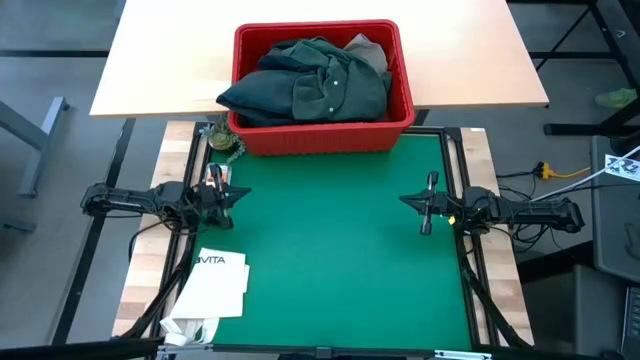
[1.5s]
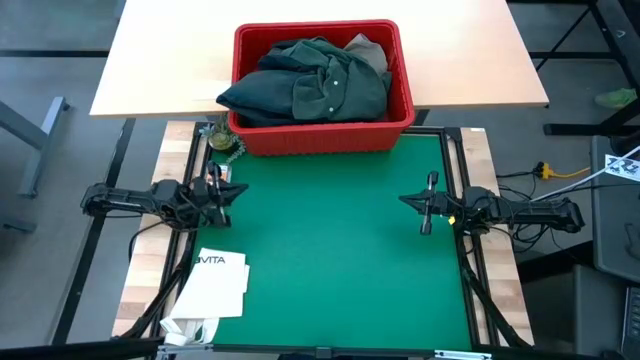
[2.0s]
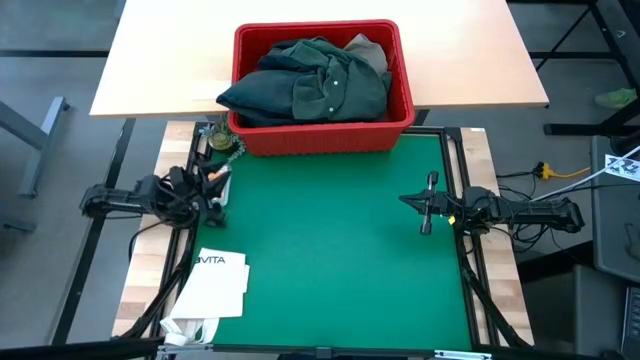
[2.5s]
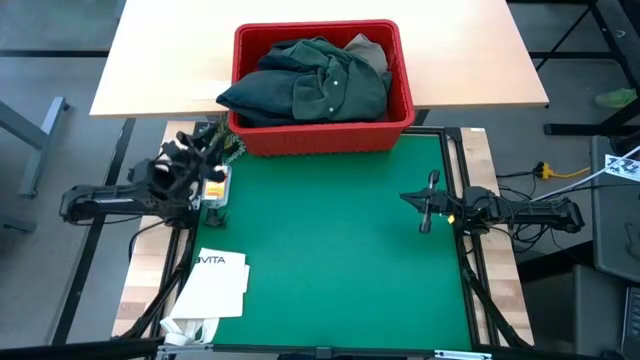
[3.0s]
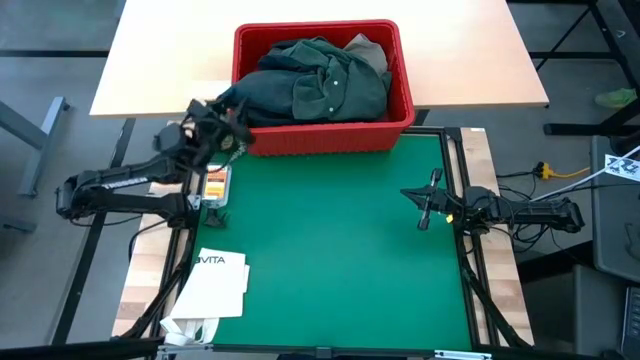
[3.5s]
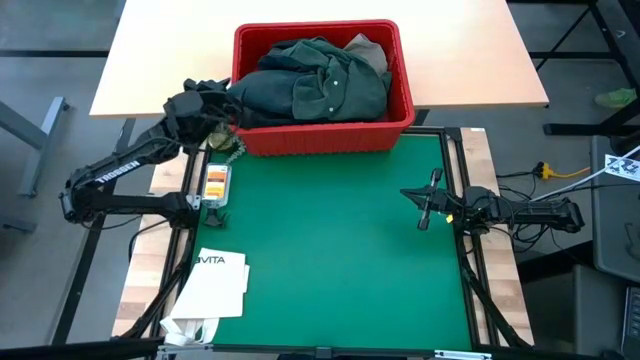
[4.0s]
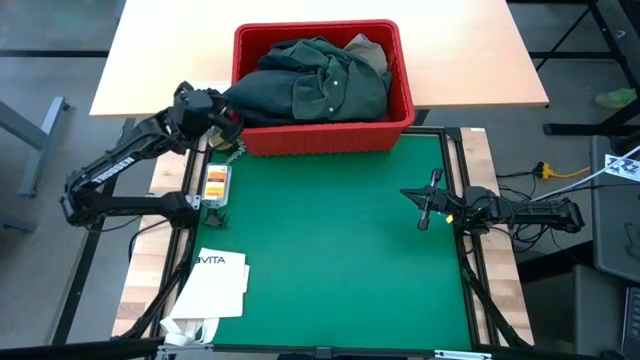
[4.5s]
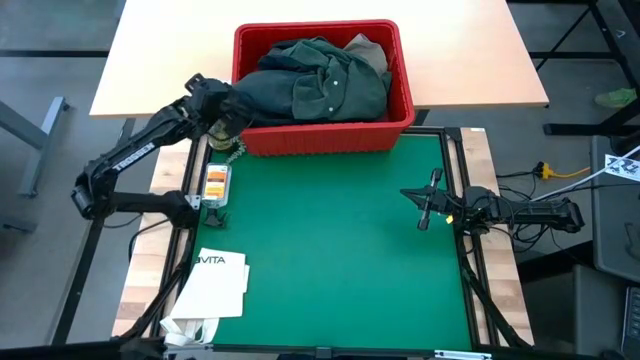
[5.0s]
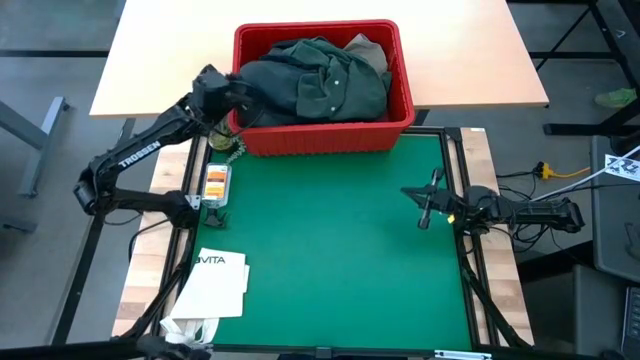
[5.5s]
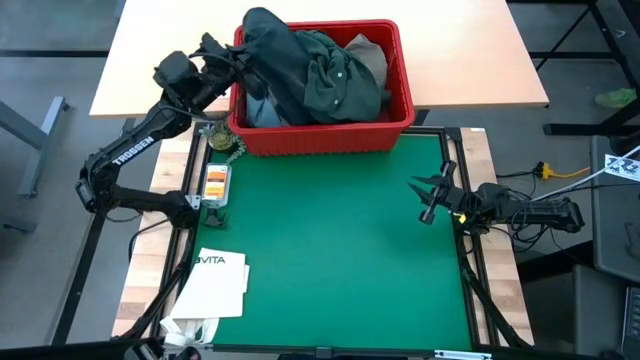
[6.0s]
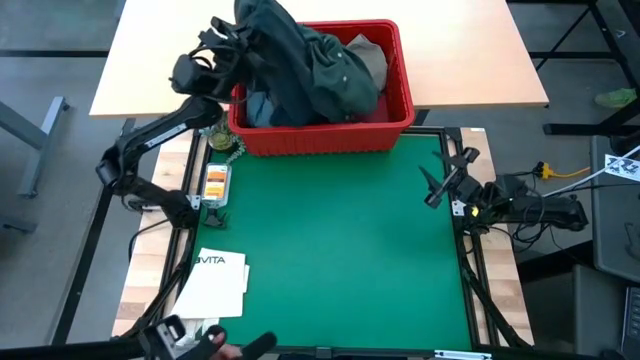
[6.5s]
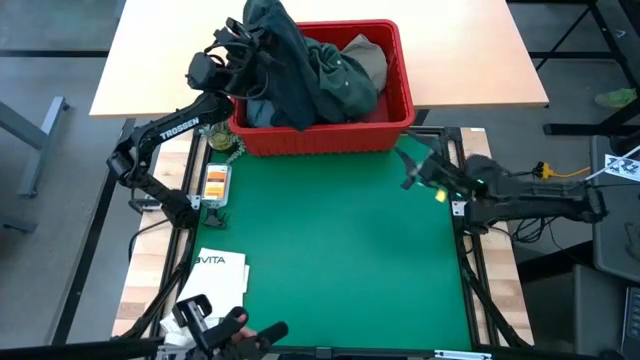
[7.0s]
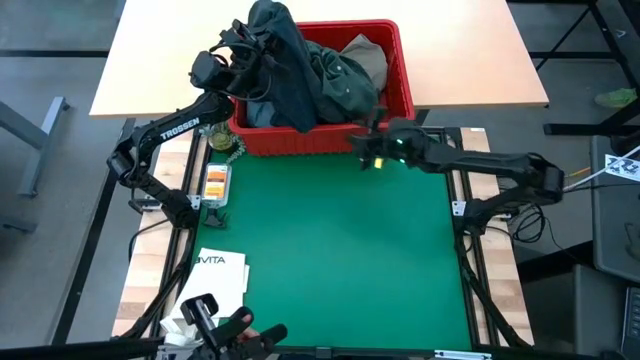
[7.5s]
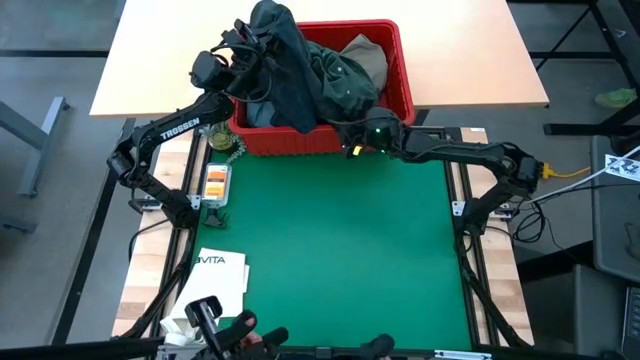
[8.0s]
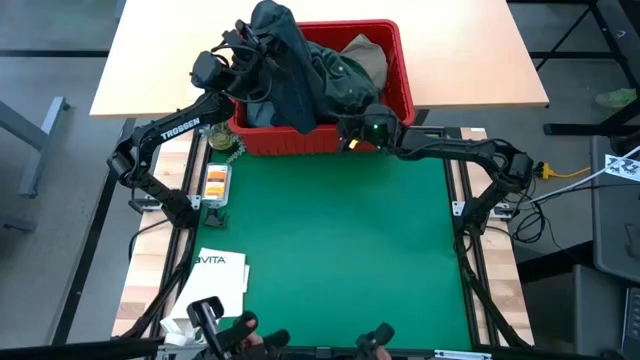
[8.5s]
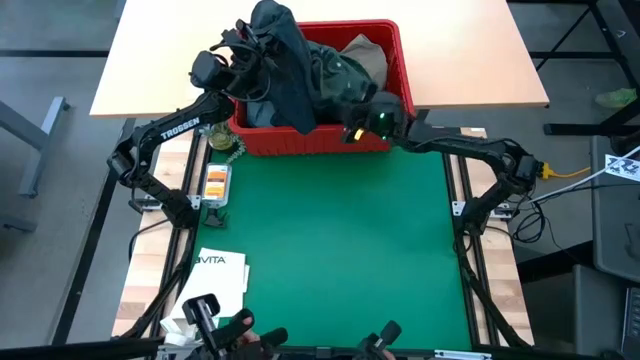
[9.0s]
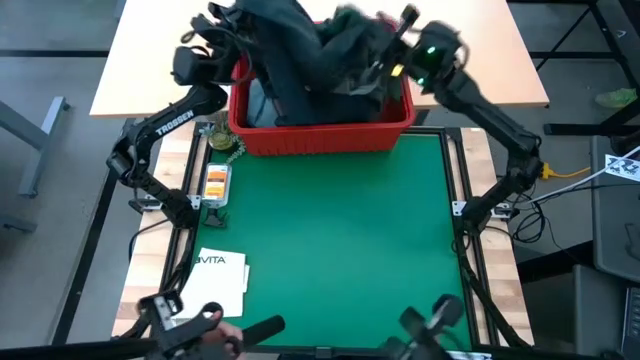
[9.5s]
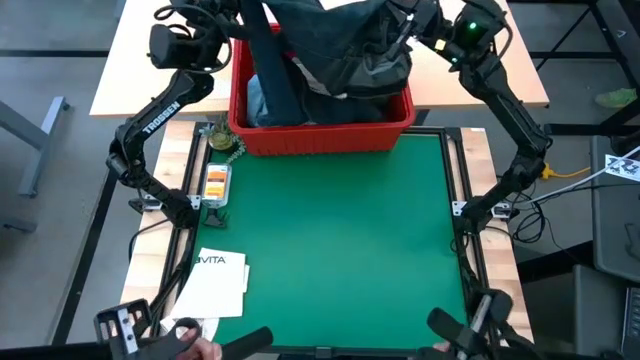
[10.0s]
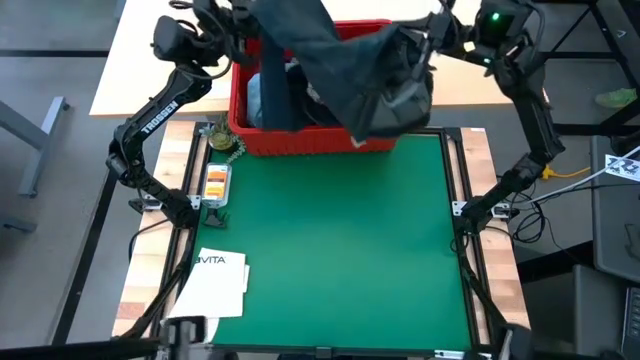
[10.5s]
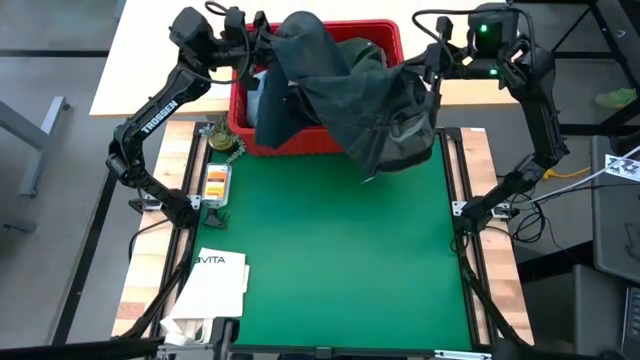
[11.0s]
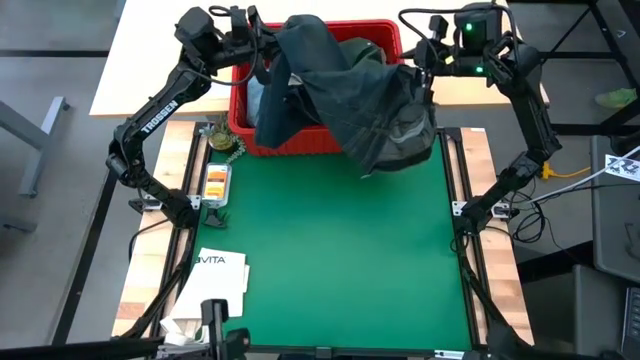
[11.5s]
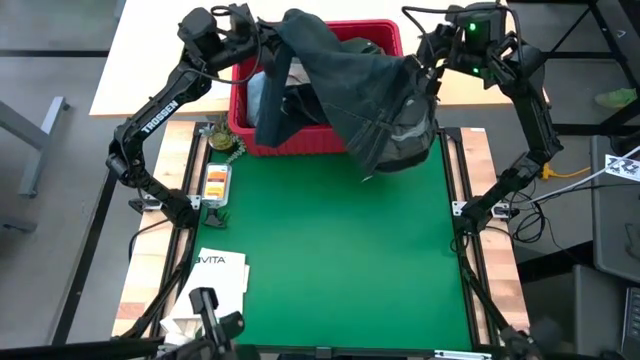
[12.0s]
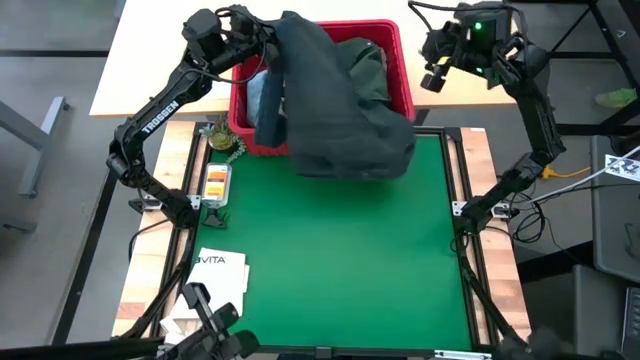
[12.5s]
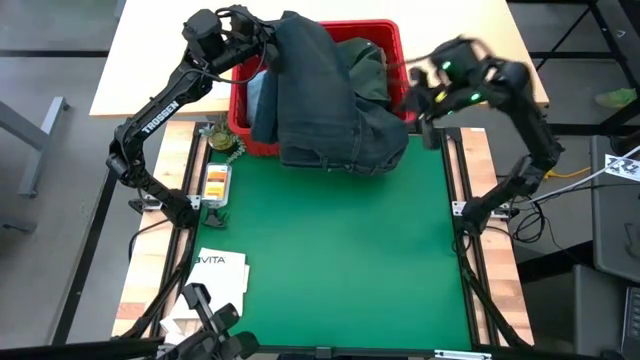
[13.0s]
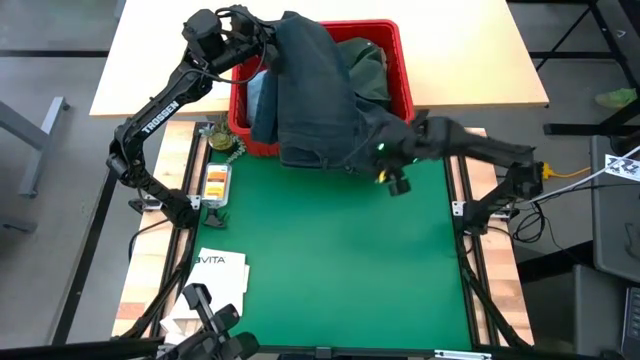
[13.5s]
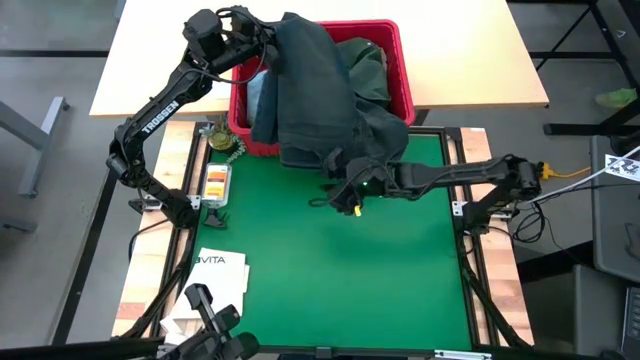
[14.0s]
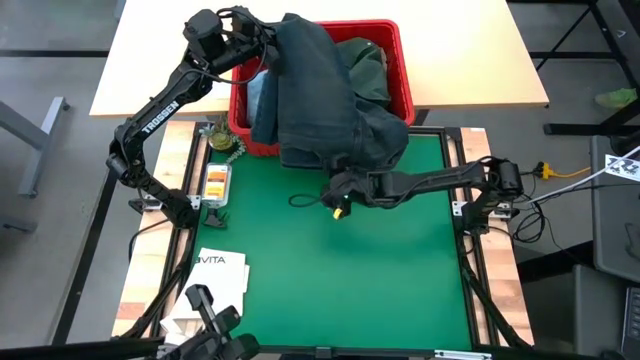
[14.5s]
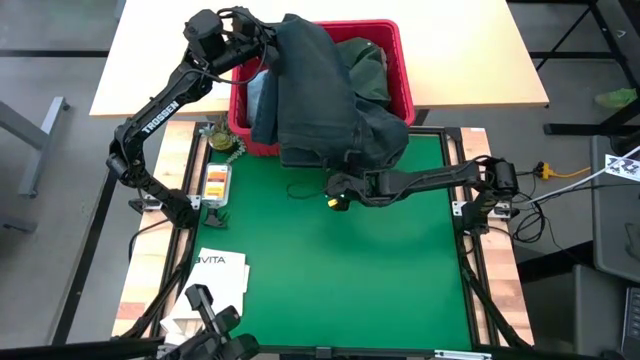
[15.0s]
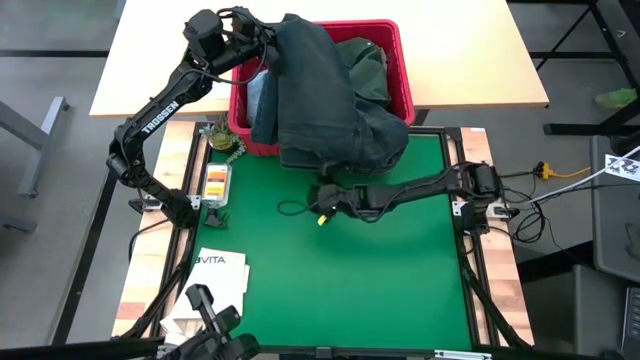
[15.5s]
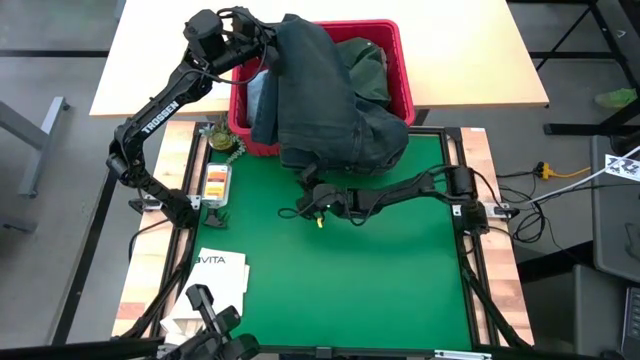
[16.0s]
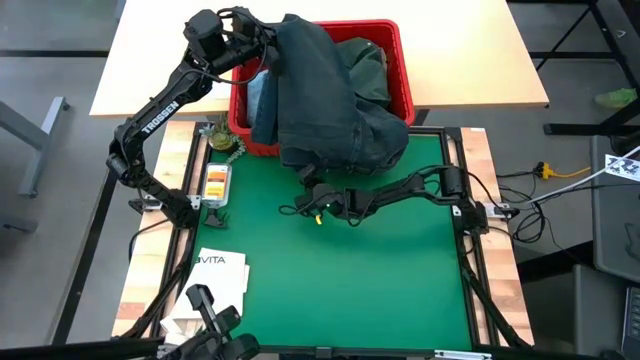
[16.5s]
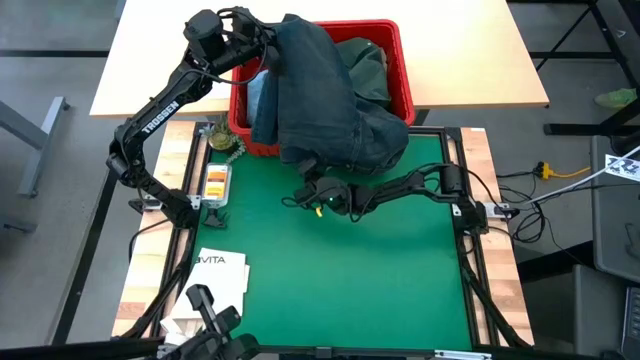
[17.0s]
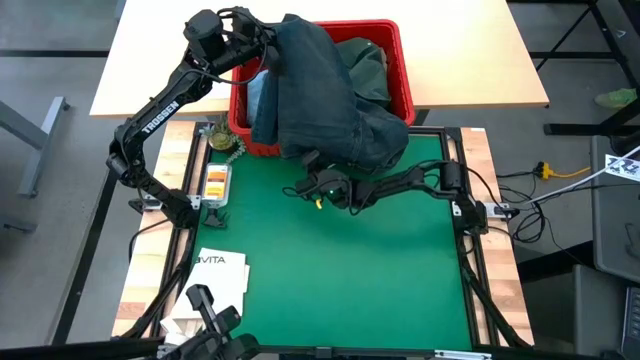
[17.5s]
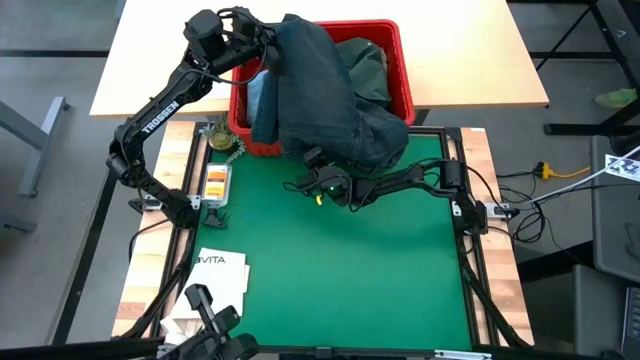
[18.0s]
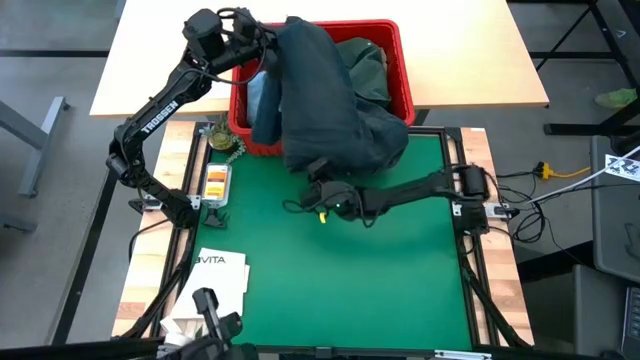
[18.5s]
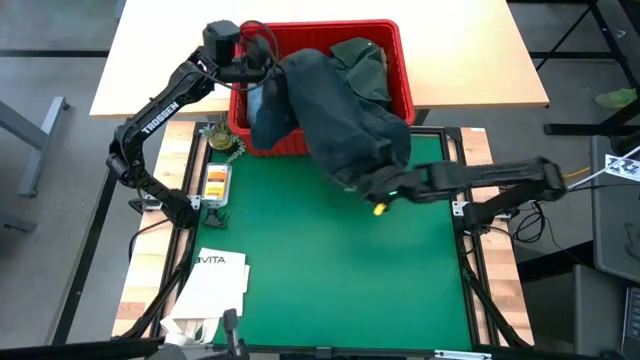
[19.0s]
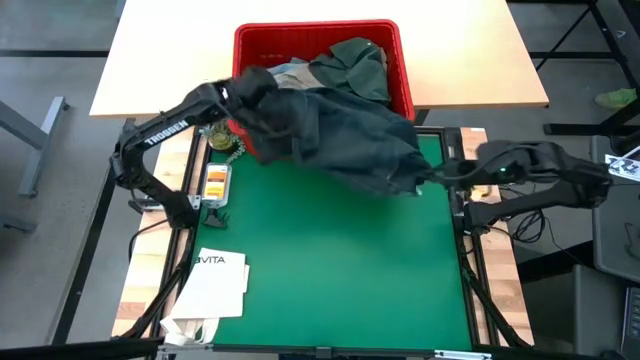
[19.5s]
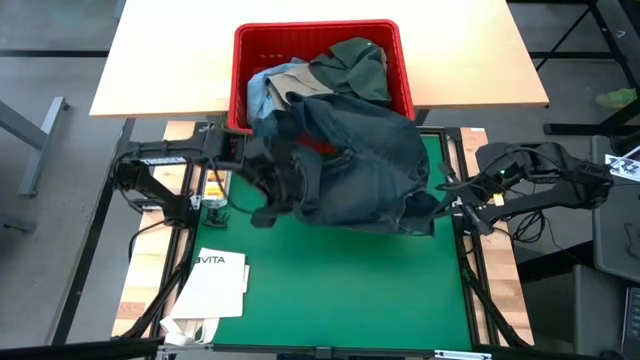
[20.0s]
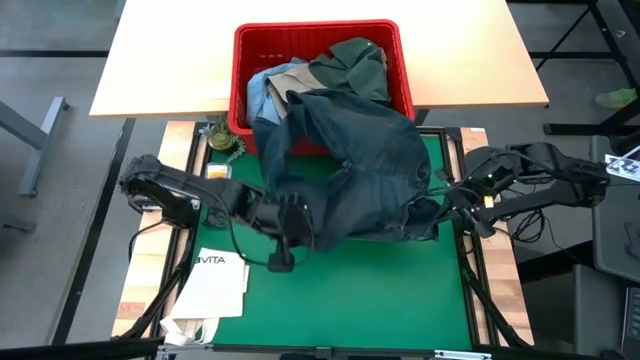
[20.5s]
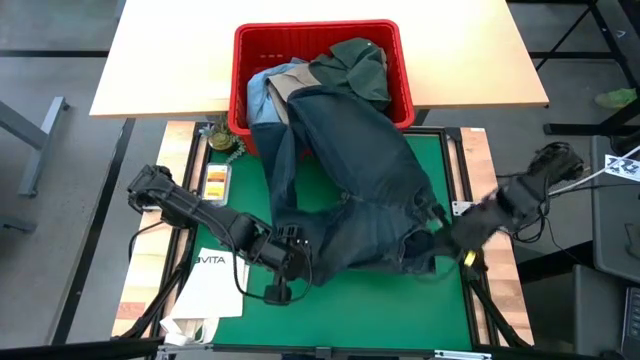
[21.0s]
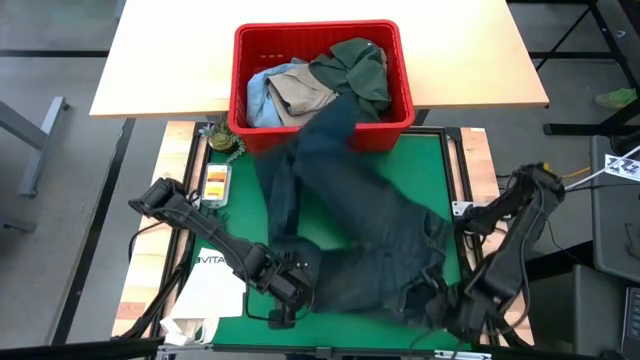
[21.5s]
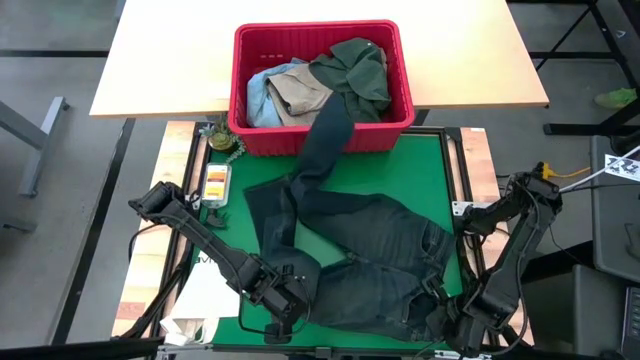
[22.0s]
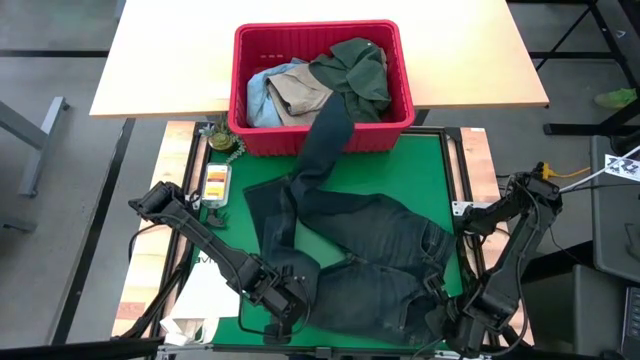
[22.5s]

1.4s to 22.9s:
Task: Fold Laundry from Bin
Fold the dark blue pants
